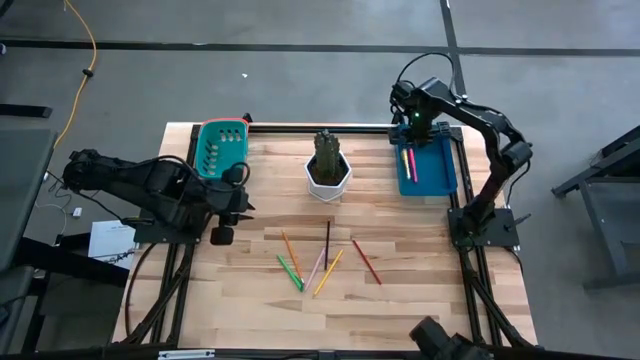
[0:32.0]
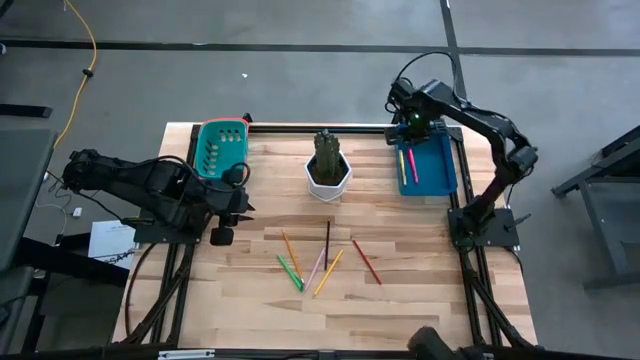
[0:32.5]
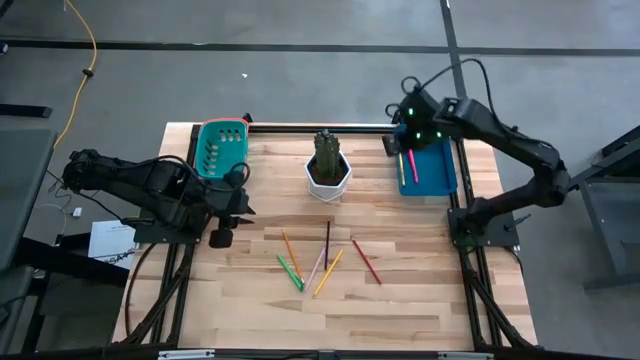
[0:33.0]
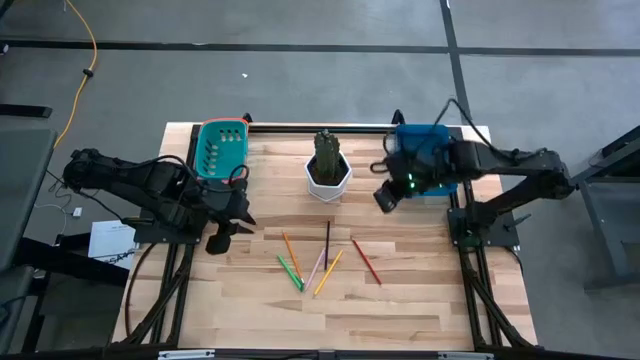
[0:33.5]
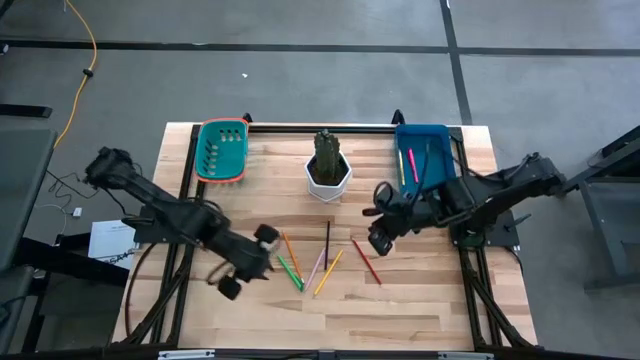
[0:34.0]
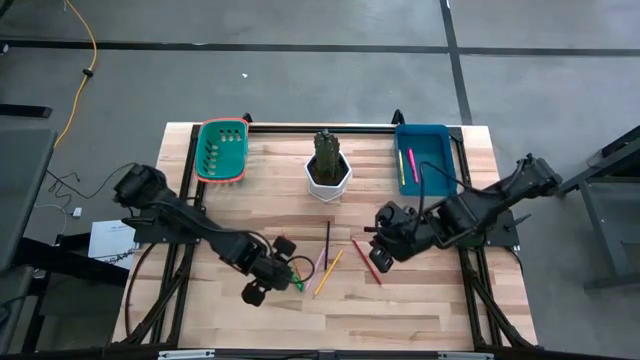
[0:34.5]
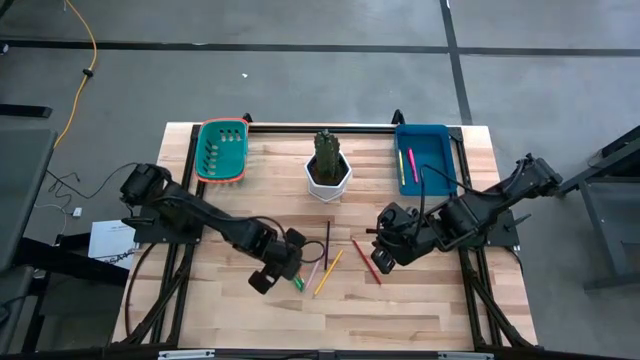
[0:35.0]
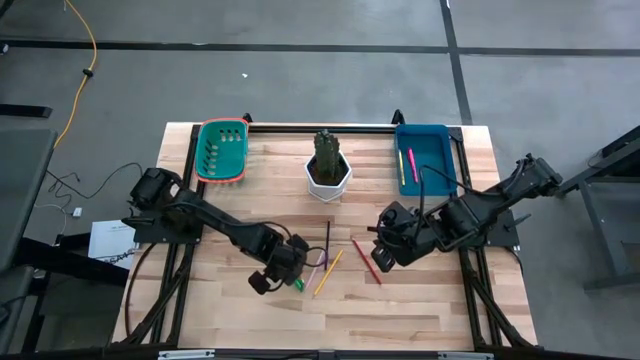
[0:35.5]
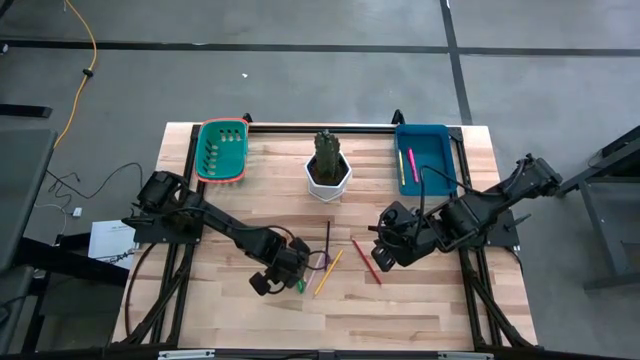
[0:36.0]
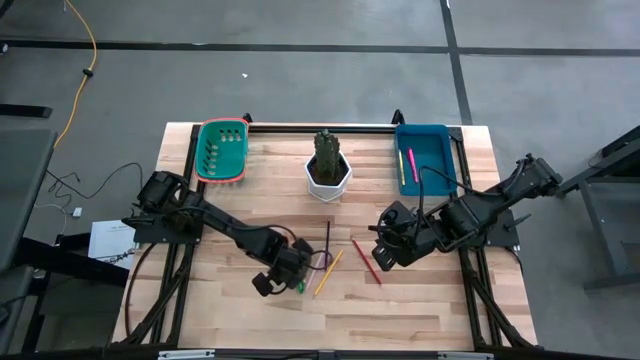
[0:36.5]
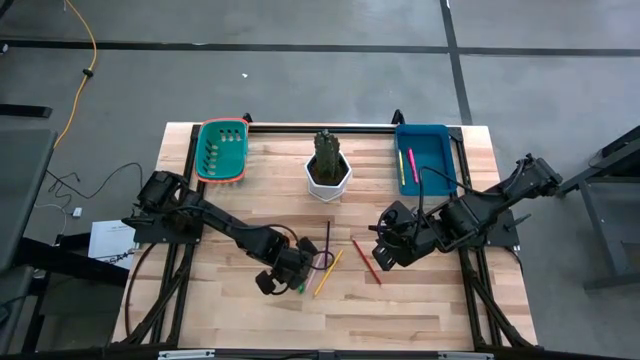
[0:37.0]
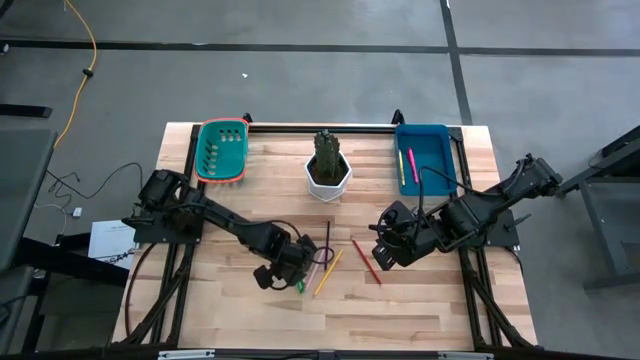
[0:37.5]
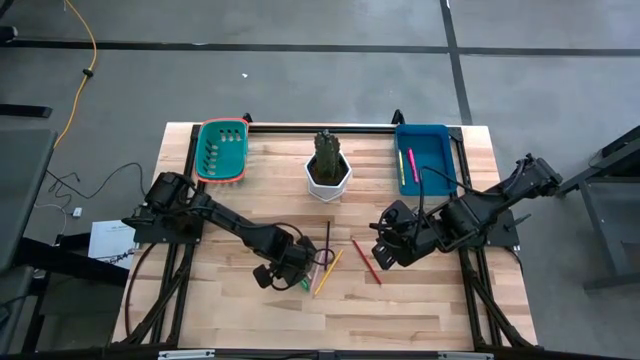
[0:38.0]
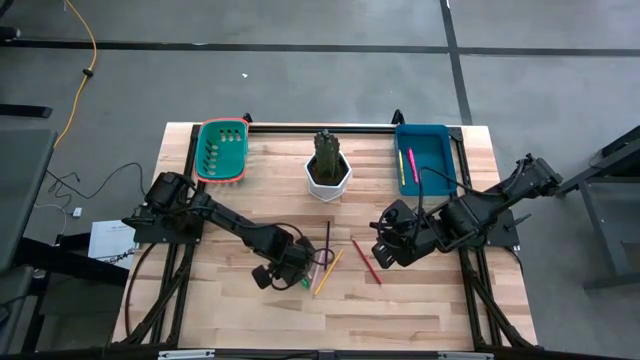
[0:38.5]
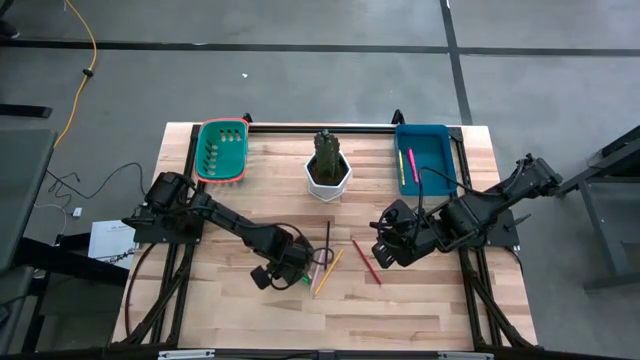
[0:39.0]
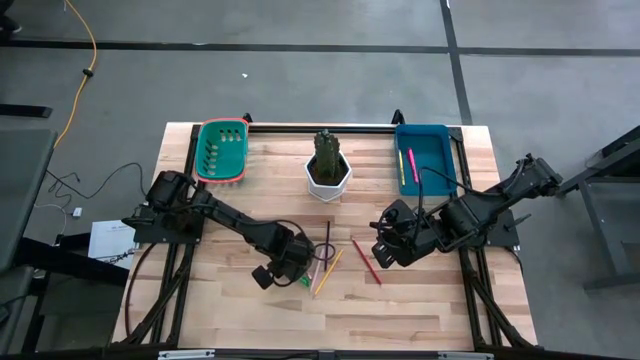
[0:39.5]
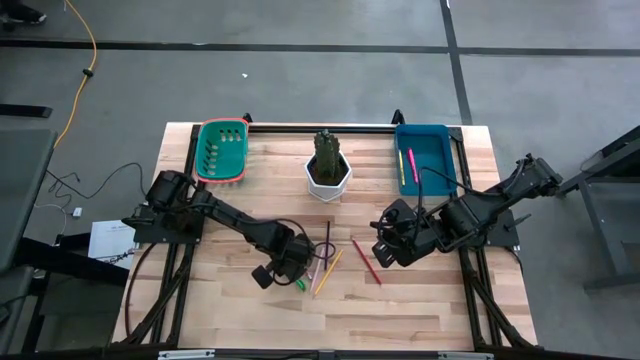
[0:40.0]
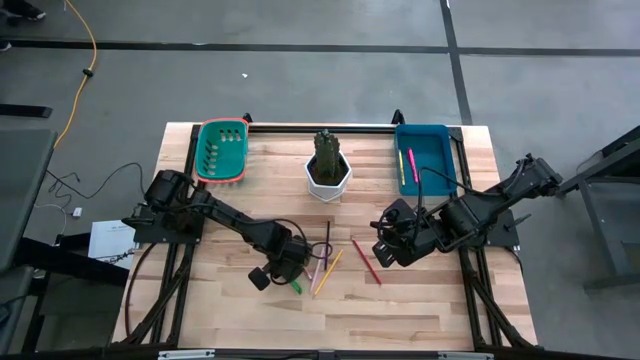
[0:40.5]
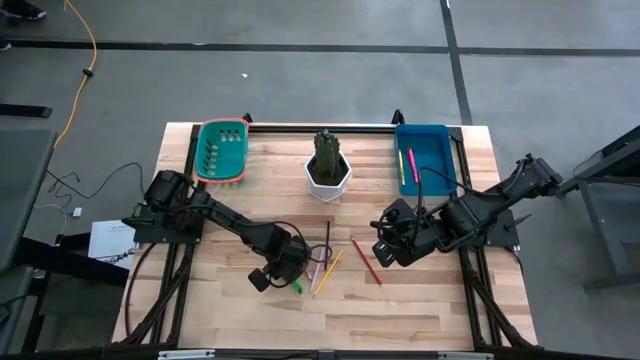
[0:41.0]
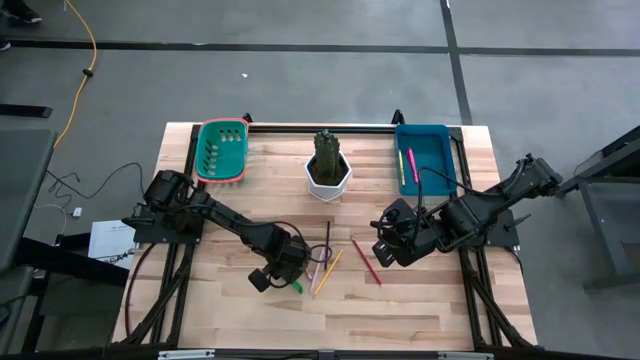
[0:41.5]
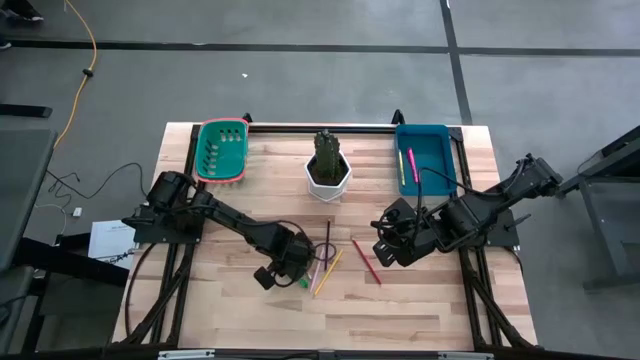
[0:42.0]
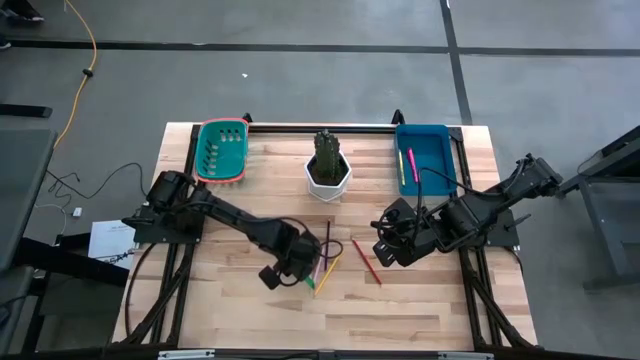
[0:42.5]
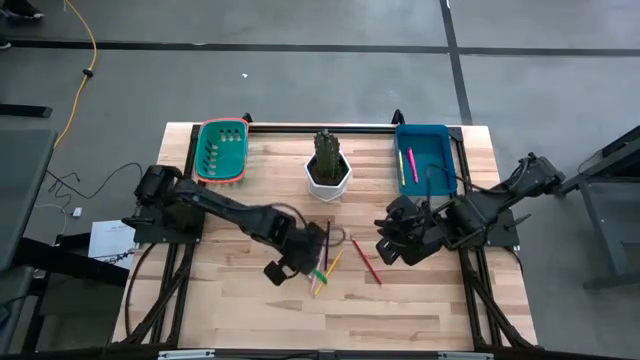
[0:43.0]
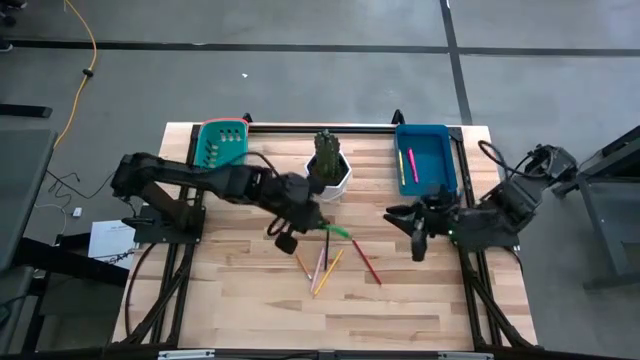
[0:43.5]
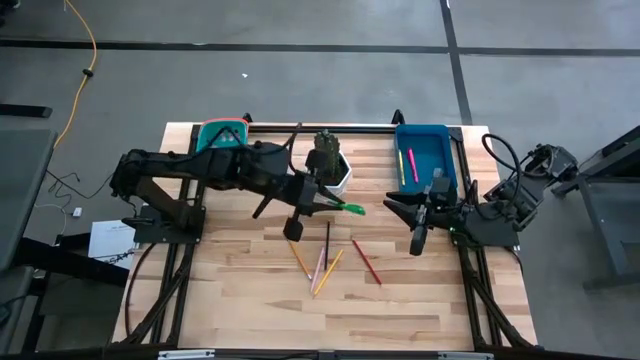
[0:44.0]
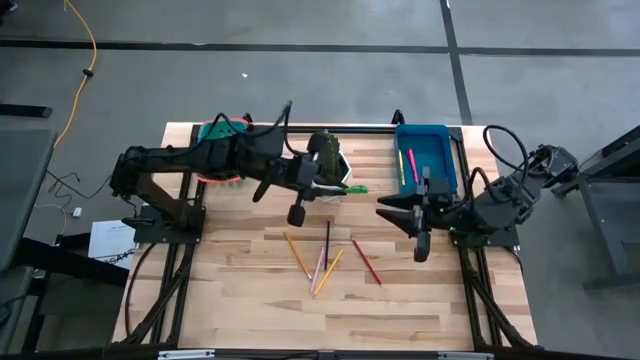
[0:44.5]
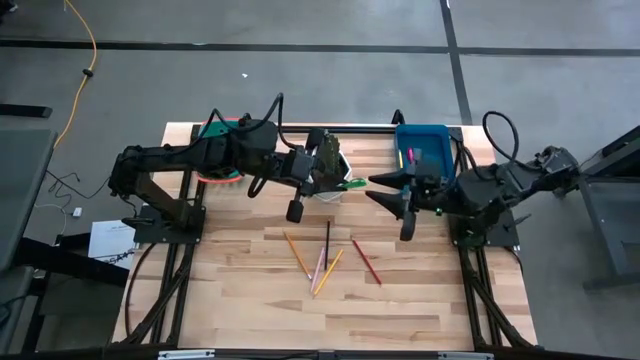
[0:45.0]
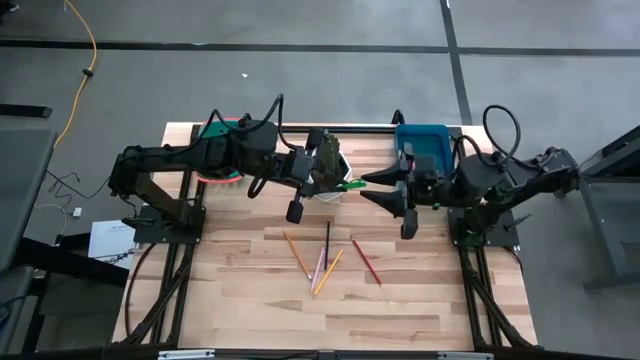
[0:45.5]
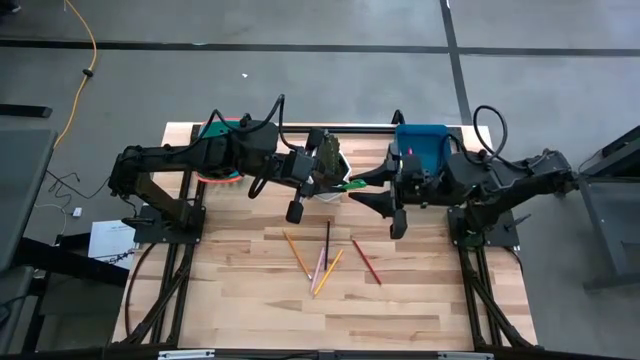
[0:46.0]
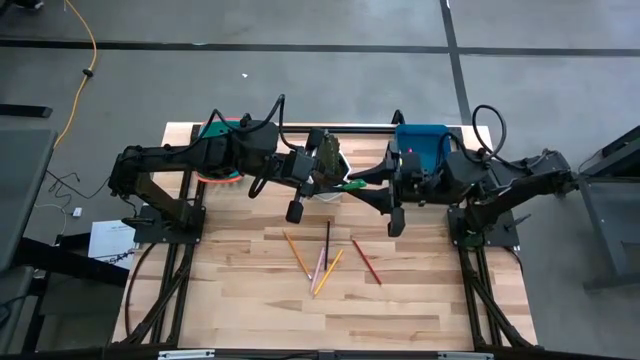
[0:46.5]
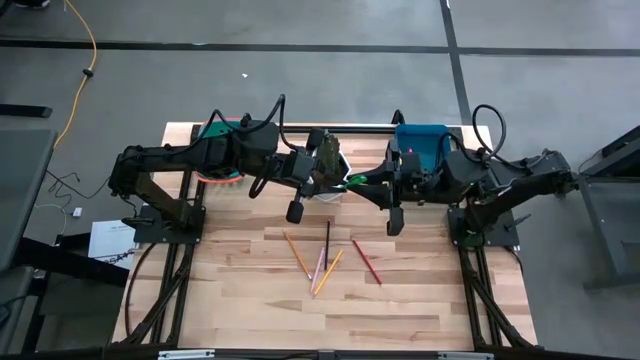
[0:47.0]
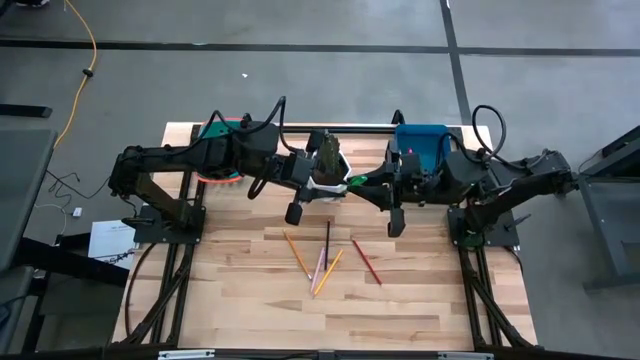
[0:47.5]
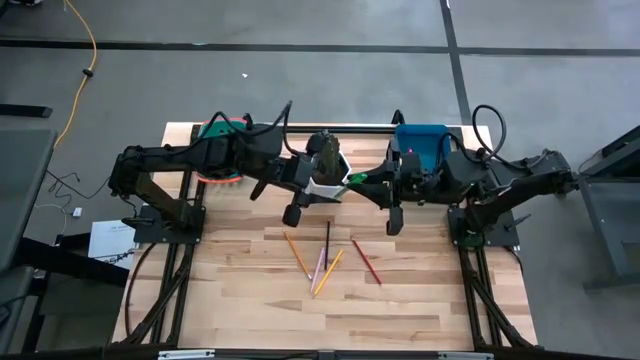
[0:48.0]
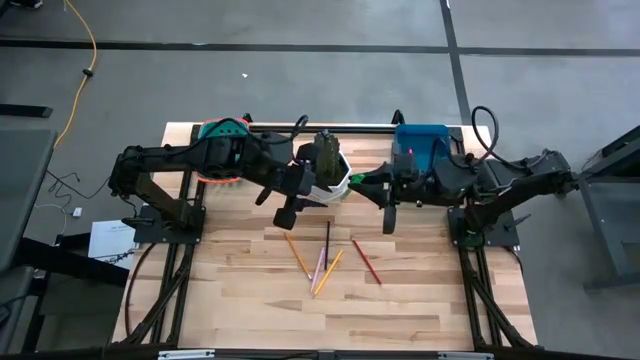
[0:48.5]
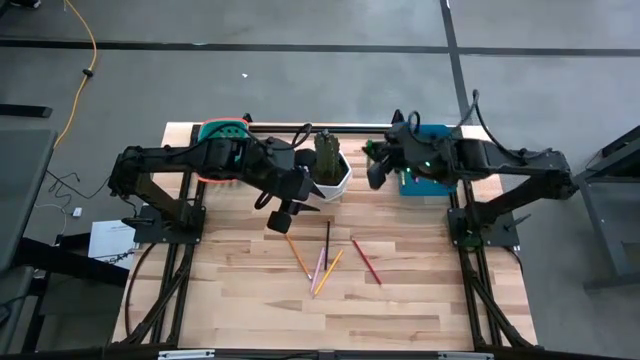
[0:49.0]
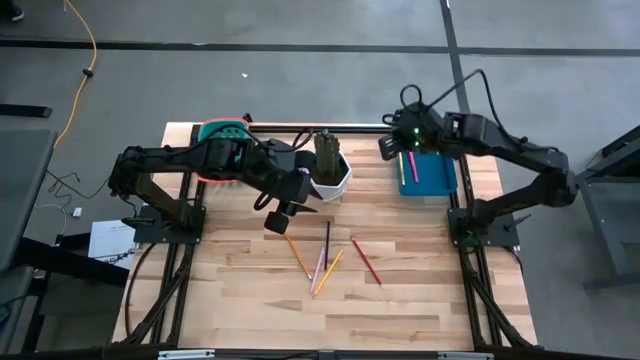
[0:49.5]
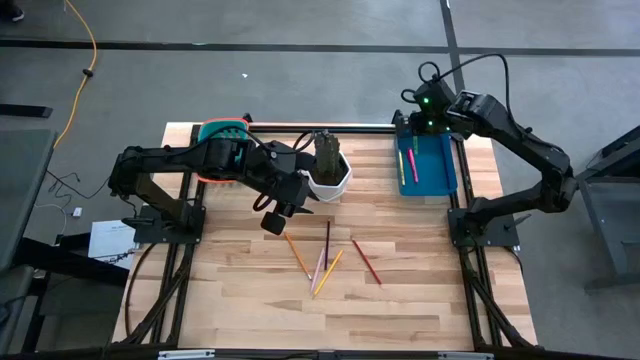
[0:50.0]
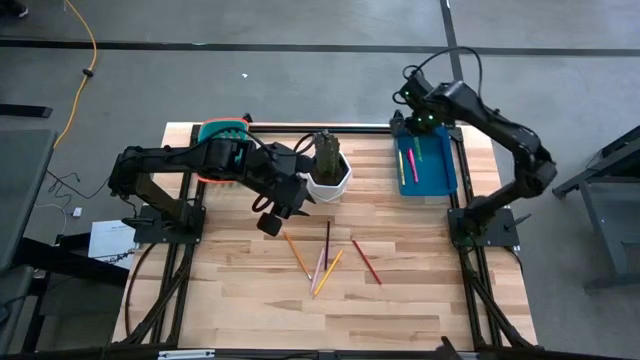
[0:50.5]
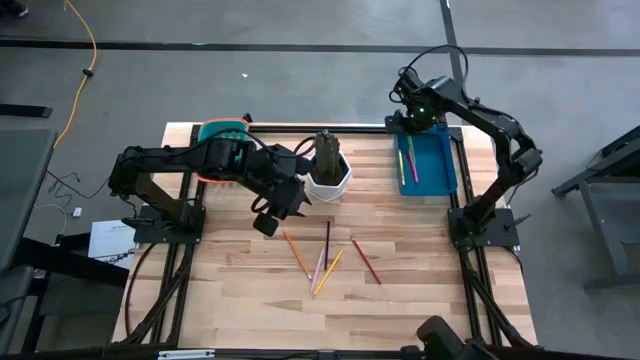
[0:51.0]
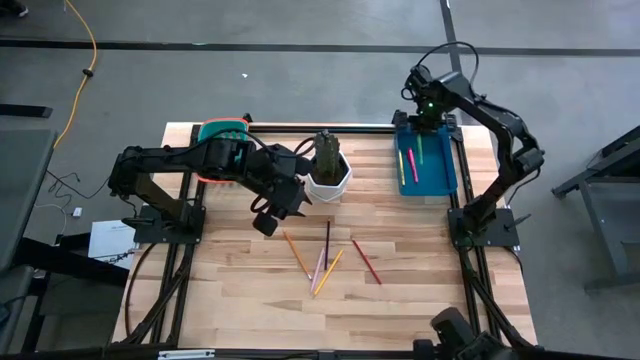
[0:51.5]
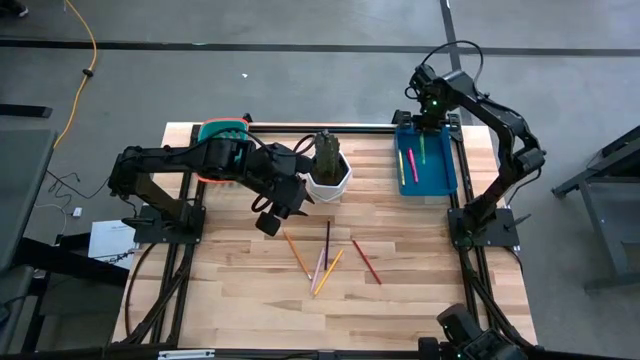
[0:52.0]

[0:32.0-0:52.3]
Task: Sort pens & pencils
Put the green pen into the blue bin
